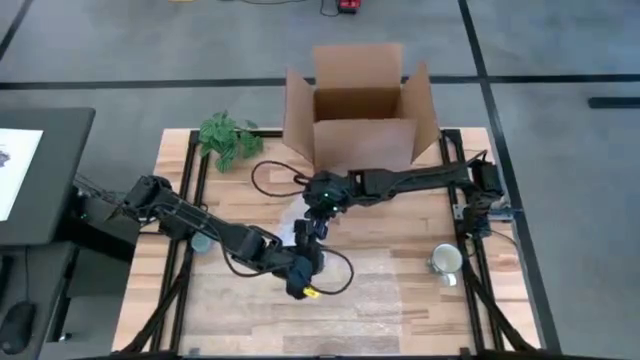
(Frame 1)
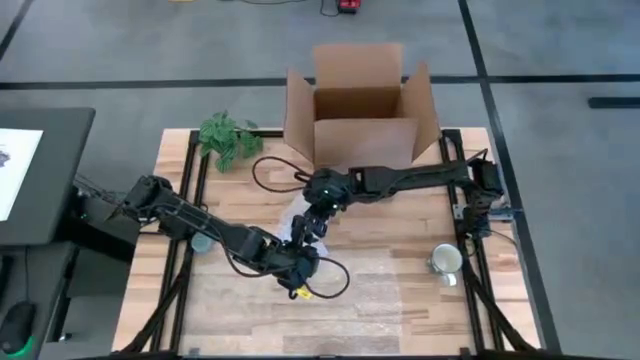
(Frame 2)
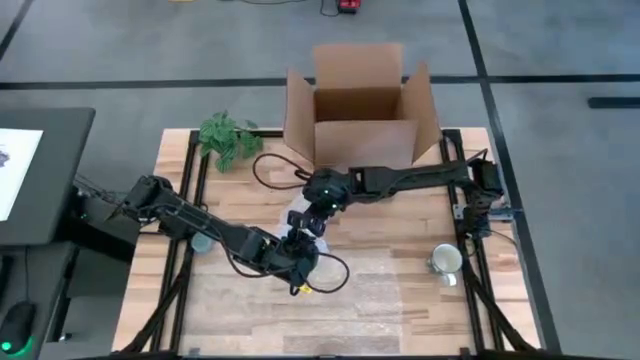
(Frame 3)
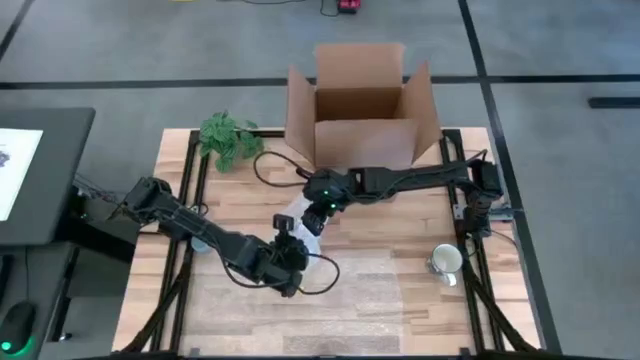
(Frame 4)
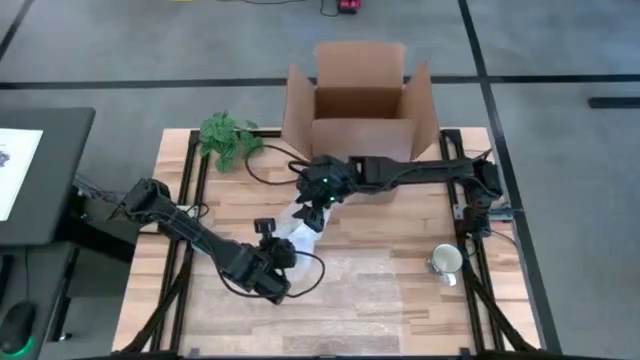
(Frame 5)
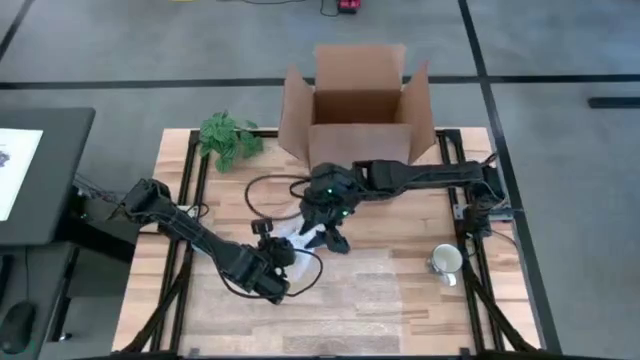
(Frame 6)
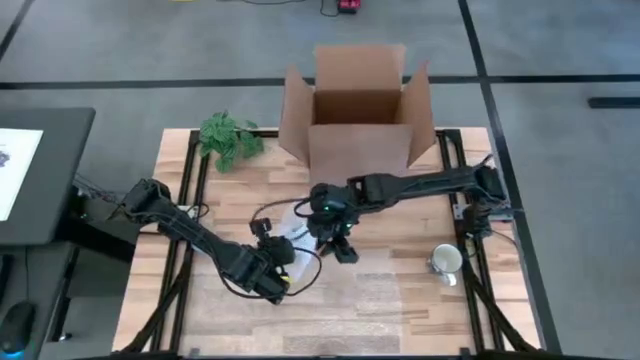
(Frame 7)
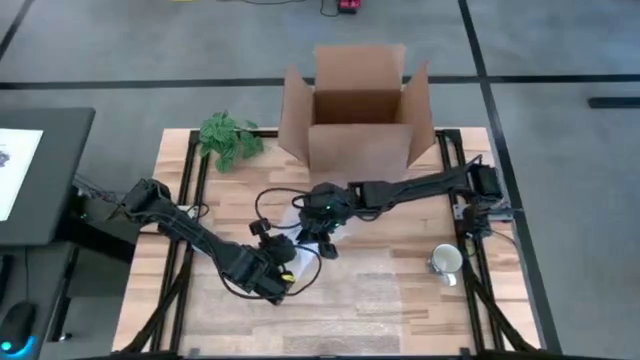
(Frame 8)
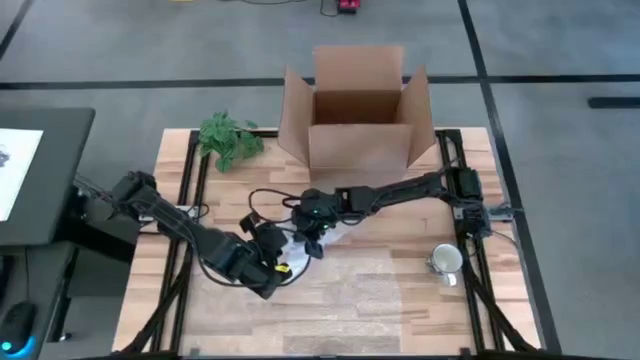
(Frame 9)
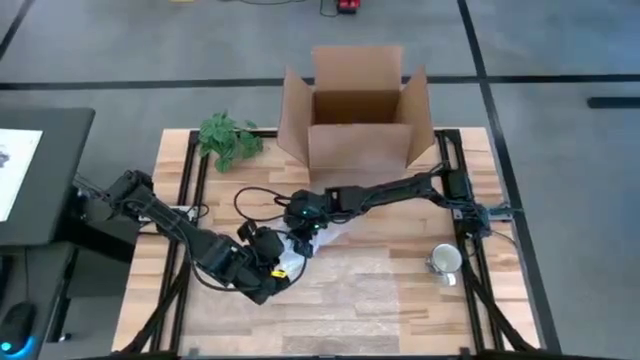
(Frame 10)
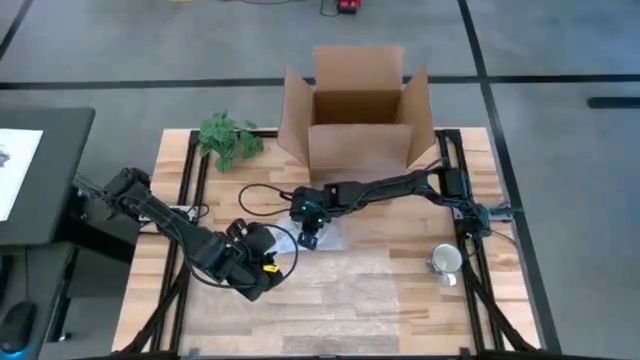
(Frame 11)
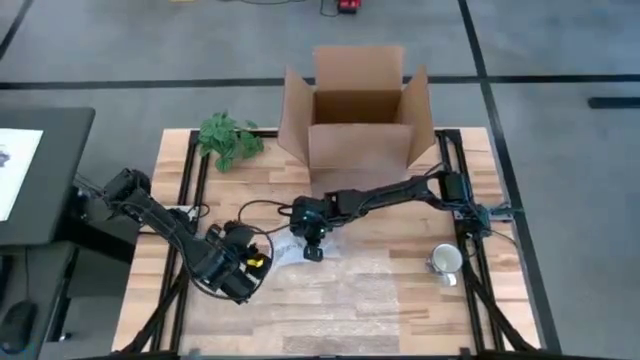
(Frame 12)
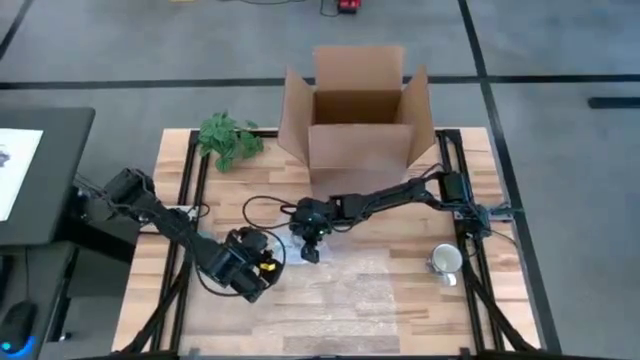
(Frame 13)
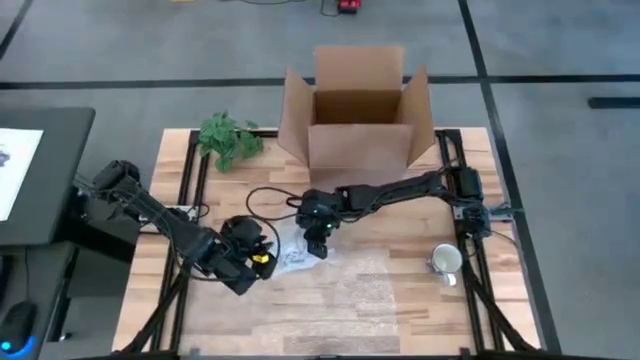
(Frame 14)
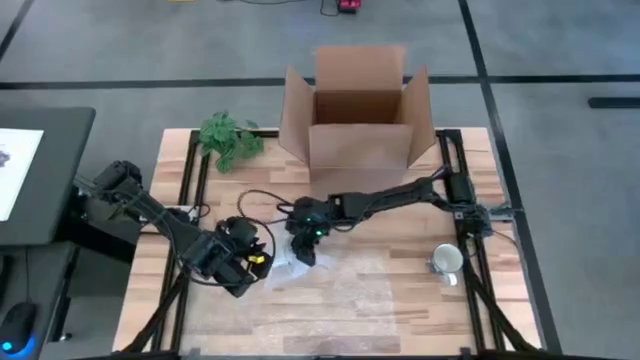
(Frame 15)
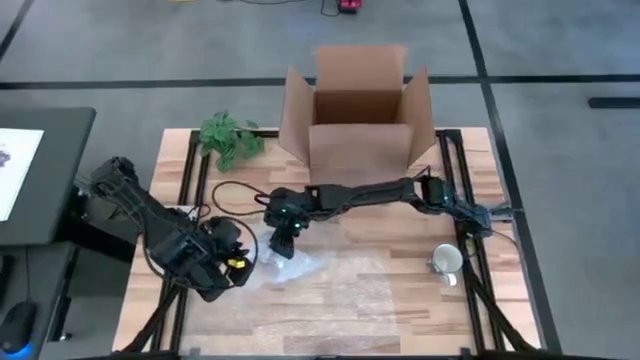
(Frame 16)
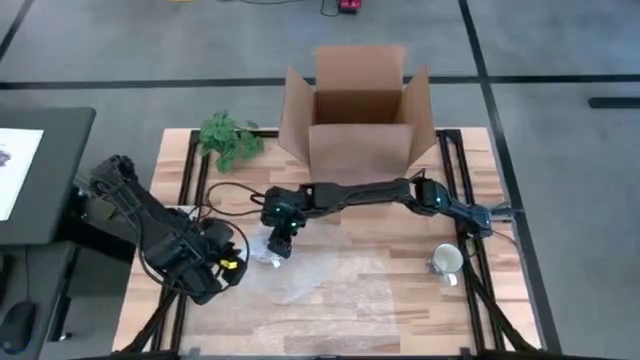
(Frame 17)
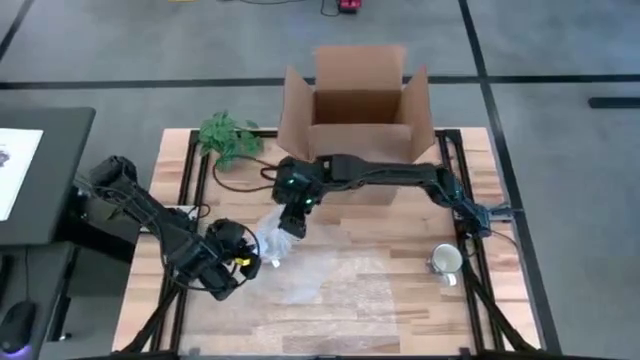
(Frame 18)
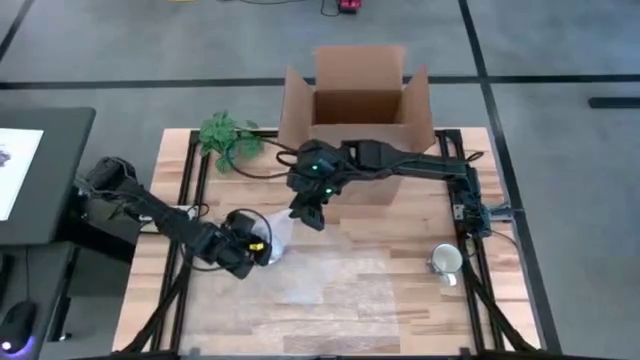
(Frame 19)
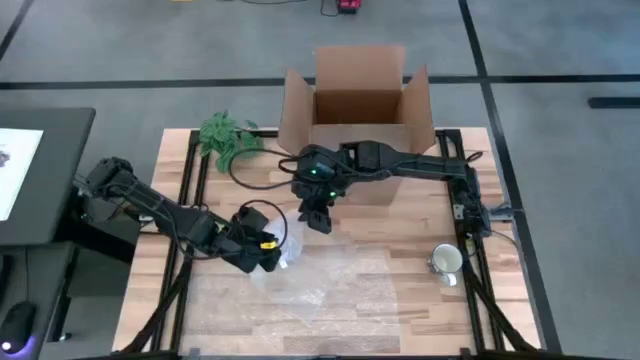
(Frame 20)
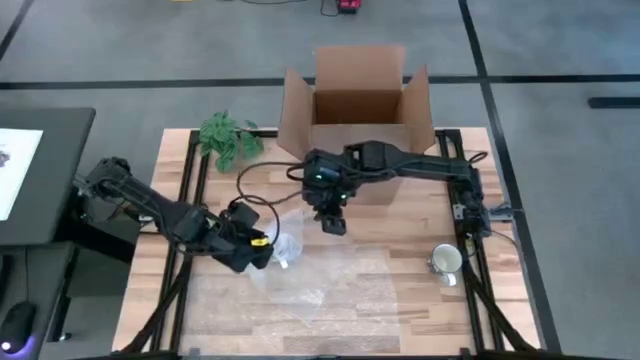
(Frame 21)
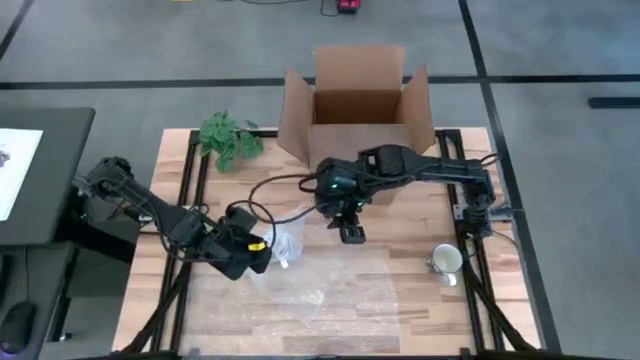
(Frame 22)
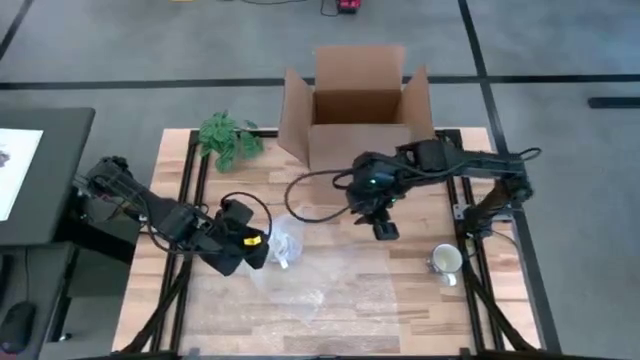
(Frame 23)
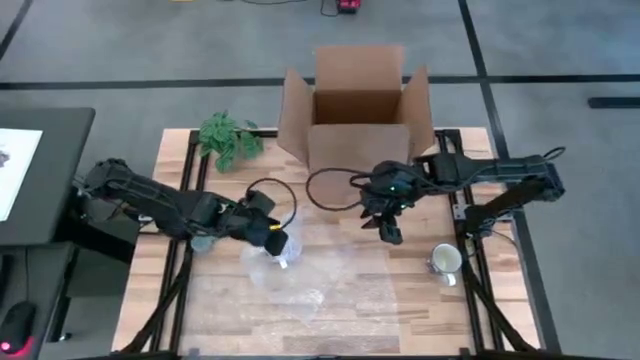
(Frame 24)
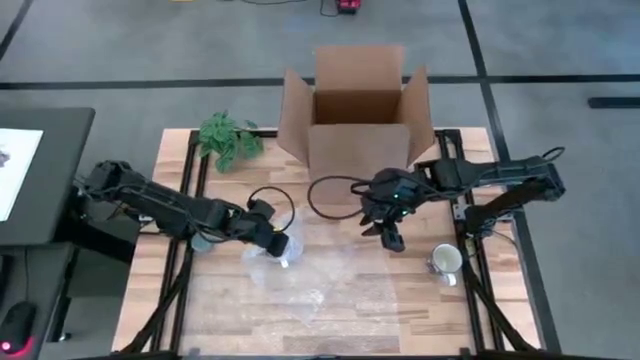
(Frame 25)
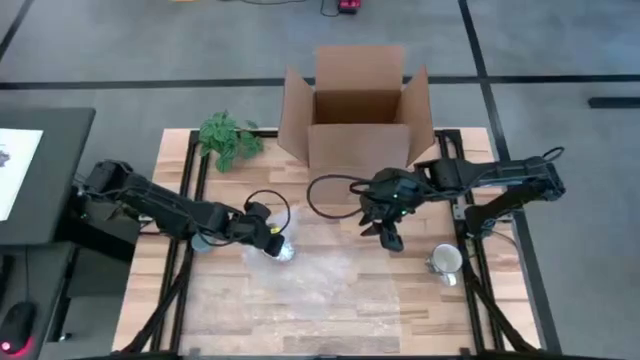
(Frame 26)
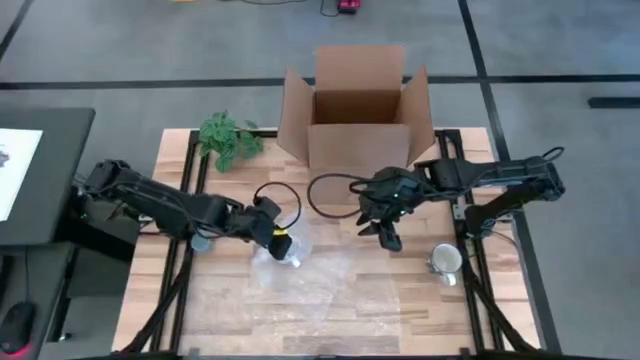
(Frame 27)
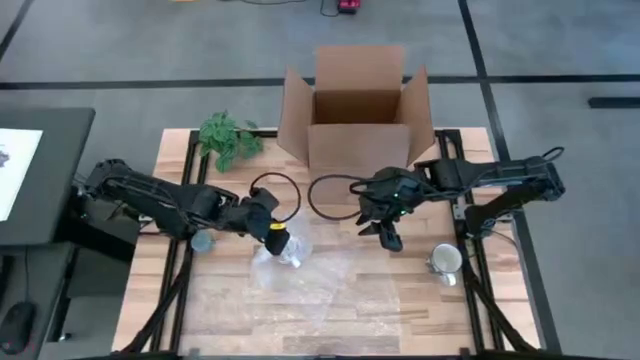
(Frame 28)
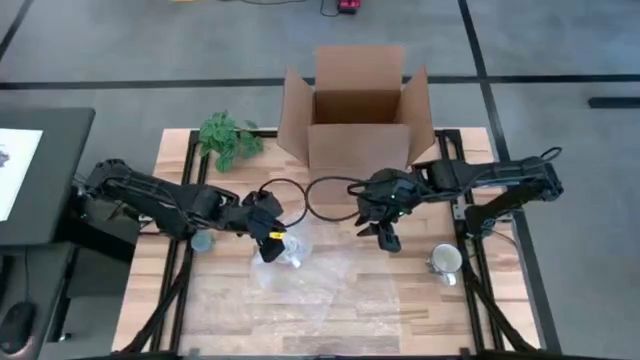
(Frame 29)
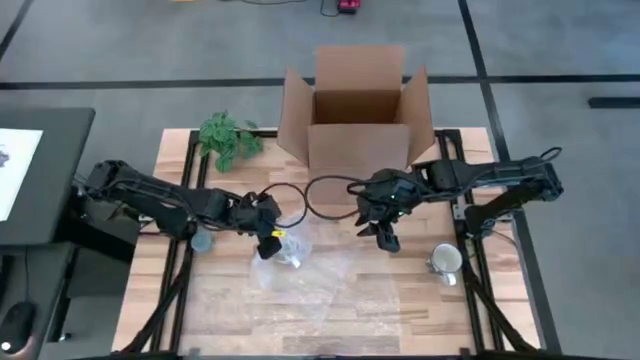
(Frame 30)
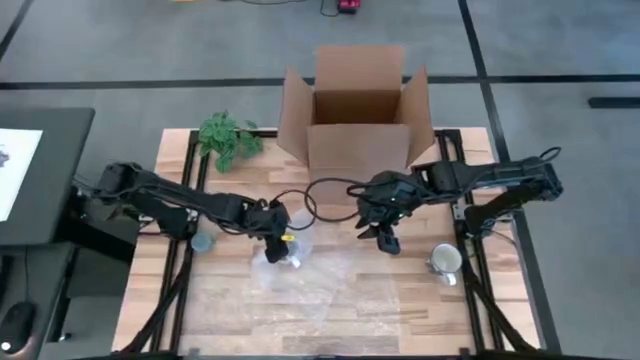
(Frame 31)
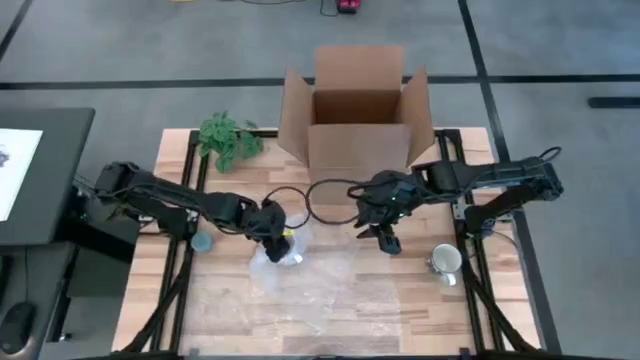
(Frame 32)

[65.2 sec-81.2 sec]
Task: wrap mug
Wrap the white mug with bubble wrap

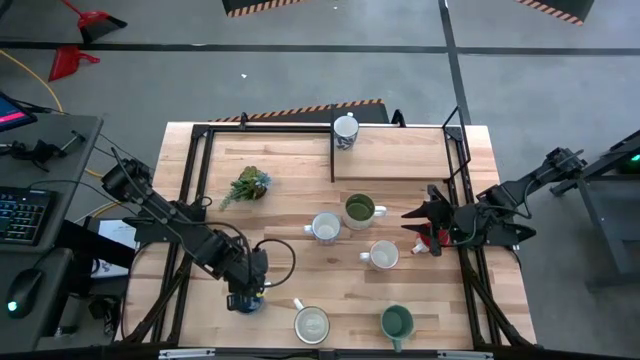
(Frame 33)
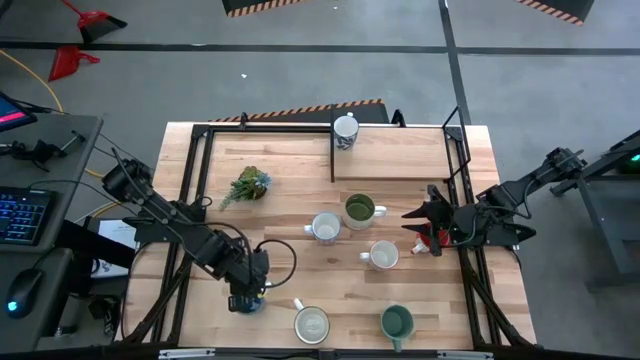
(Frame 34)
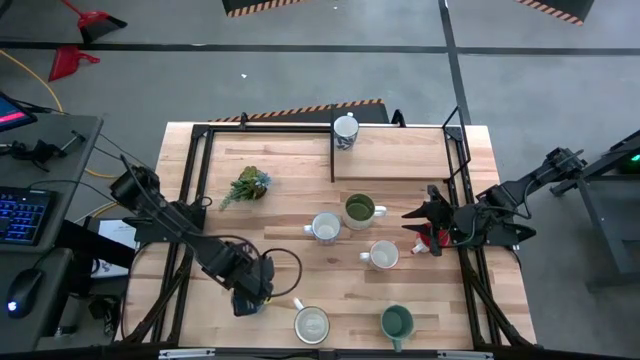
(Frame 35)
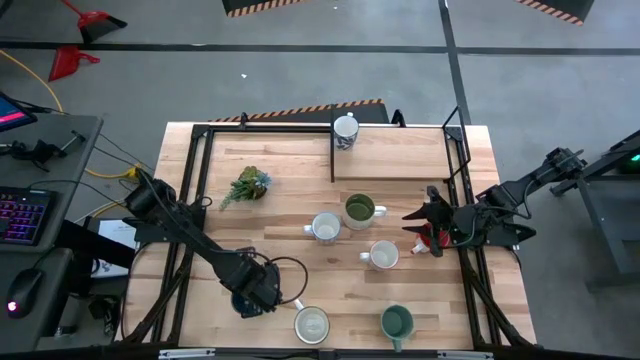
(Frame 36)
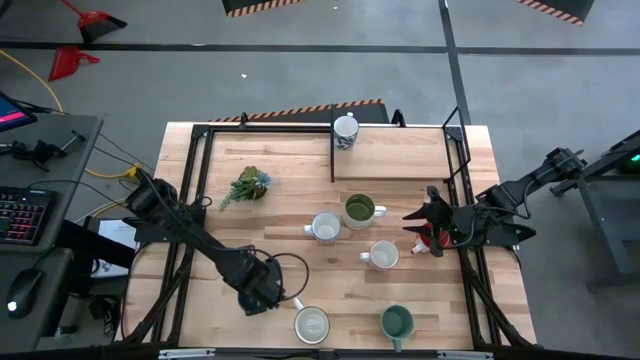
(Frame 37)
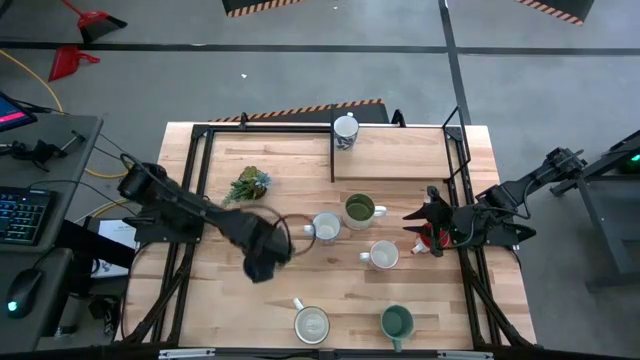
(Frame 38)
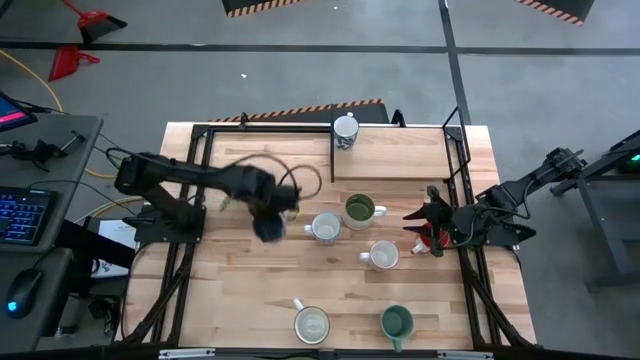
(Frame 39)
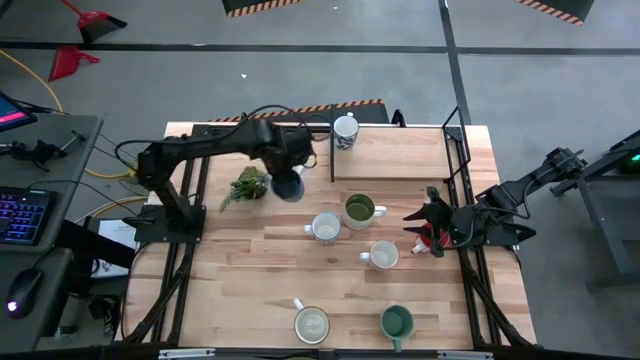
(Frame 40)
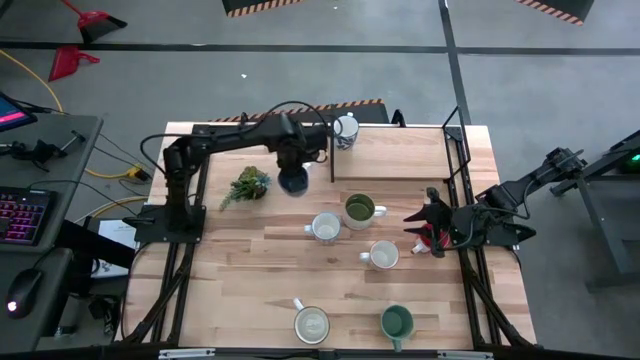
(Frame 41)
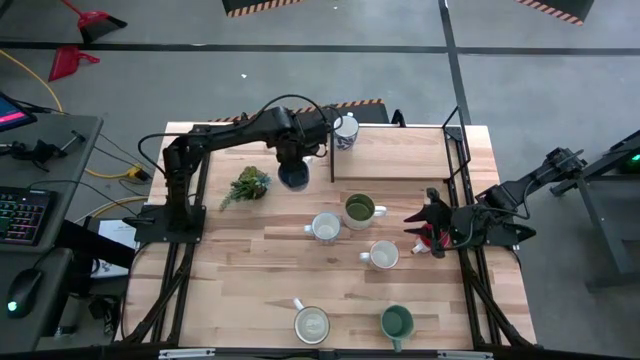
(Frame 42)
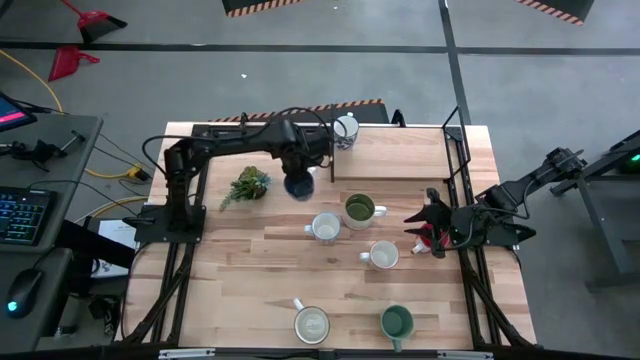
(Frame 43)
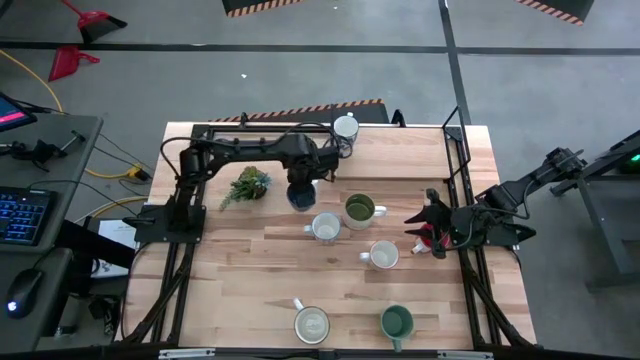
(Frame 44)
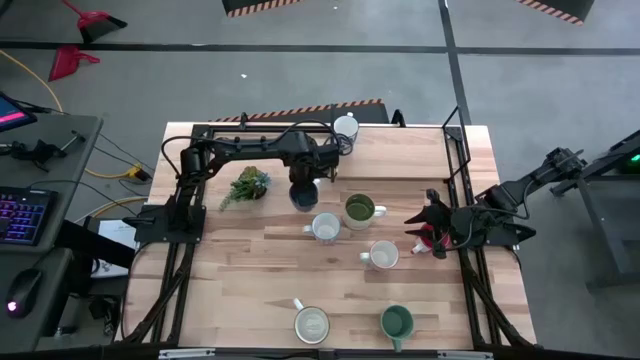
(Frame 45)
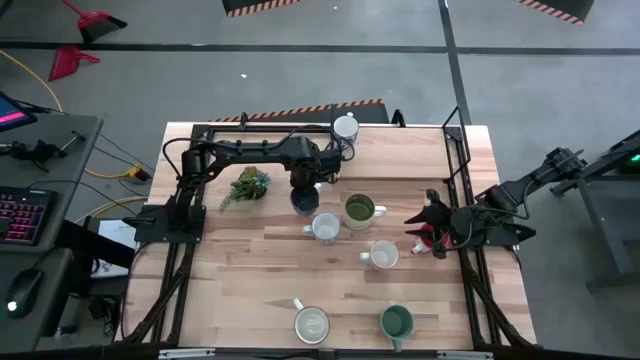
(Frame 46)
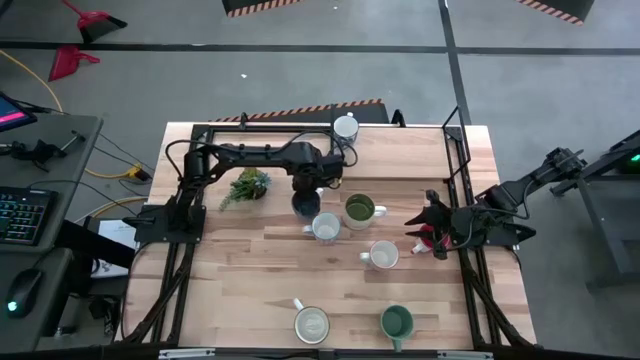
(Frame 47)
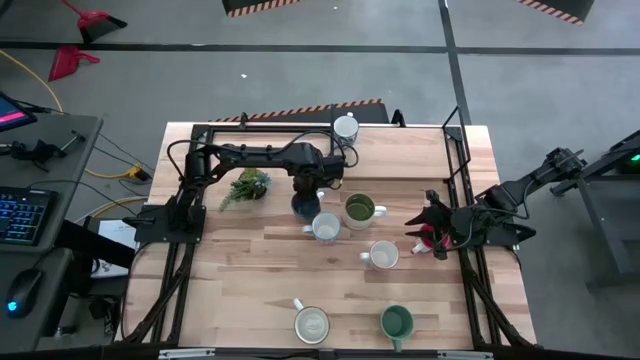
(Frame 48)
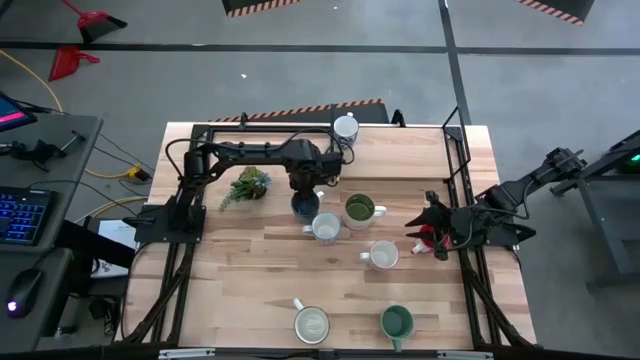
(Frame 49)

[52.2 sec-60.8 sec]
Task: Place coffee mugs
Move the blue mug to the center of the table
